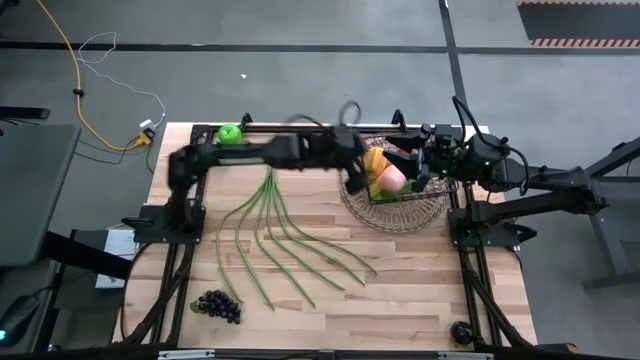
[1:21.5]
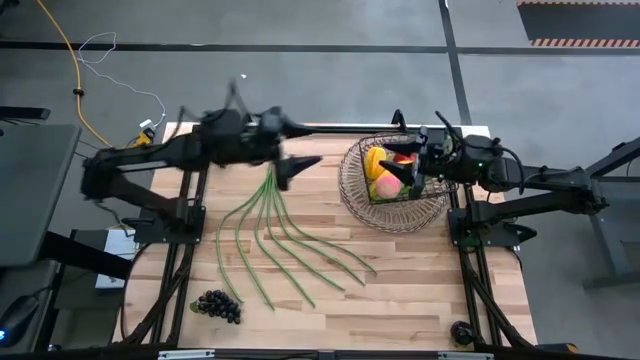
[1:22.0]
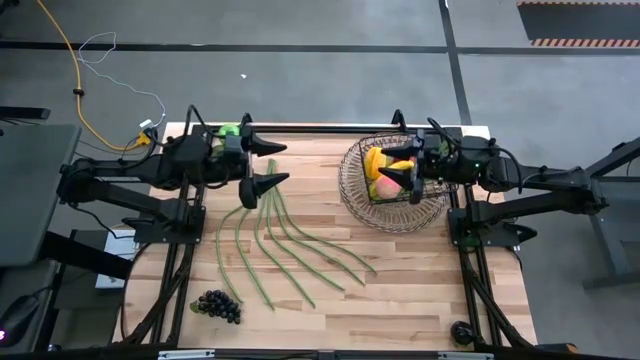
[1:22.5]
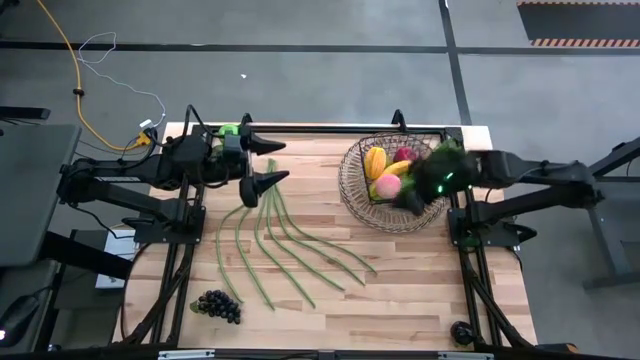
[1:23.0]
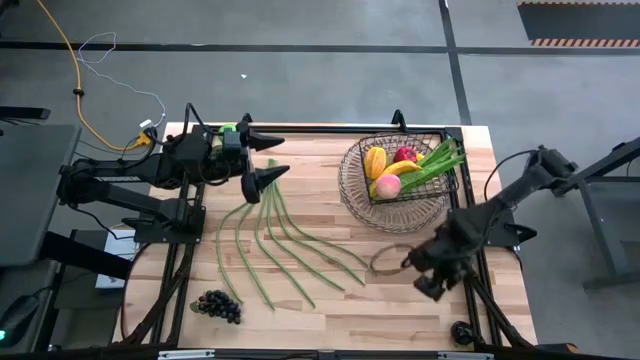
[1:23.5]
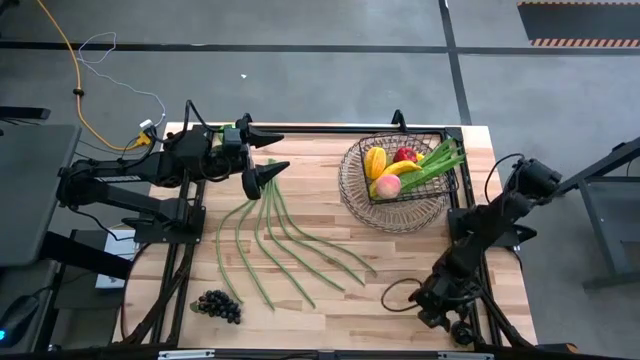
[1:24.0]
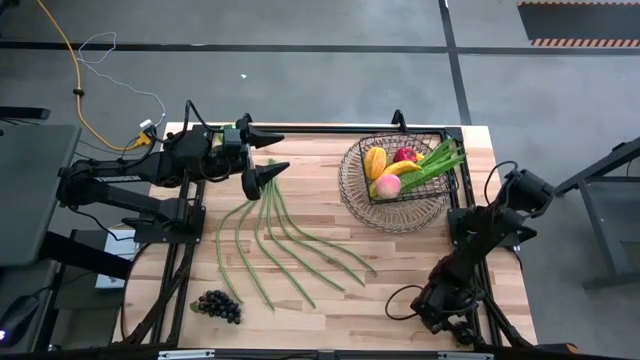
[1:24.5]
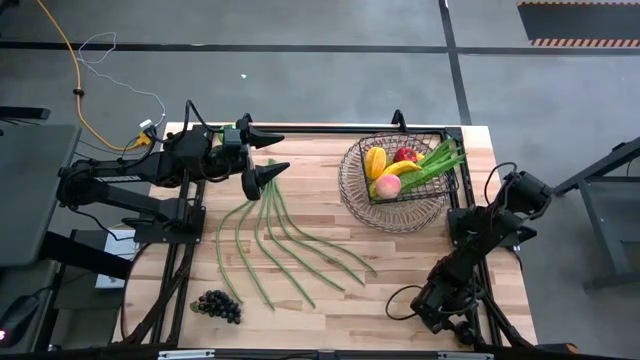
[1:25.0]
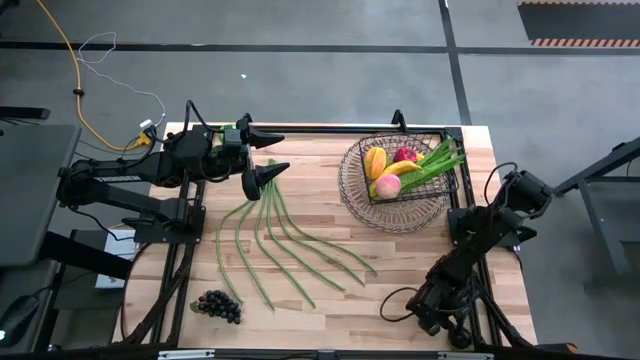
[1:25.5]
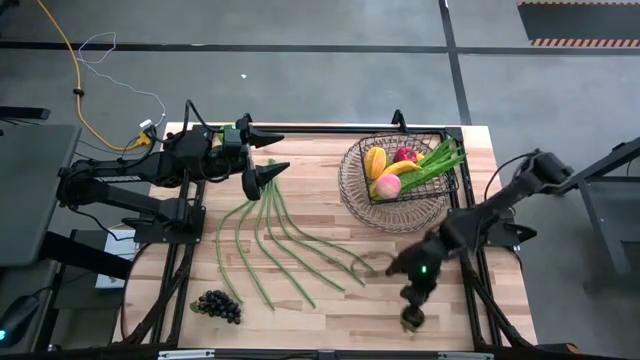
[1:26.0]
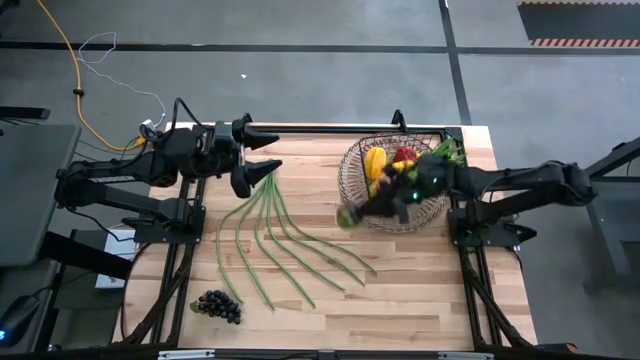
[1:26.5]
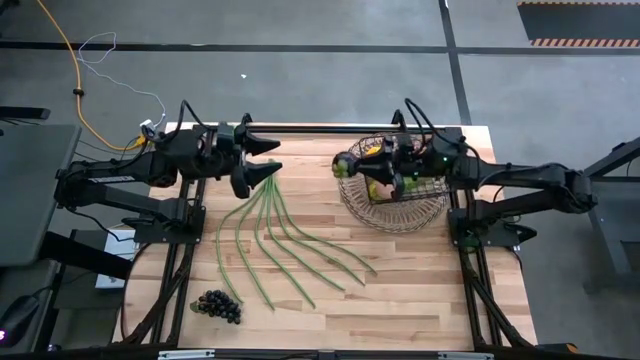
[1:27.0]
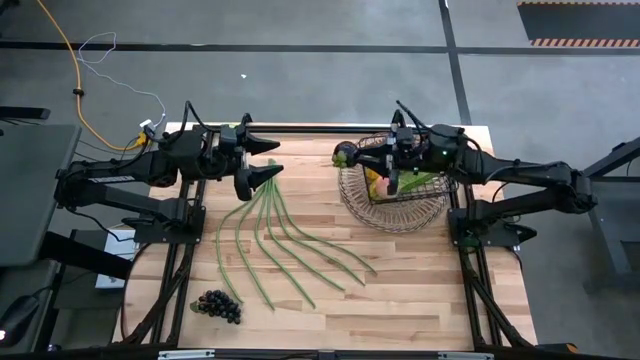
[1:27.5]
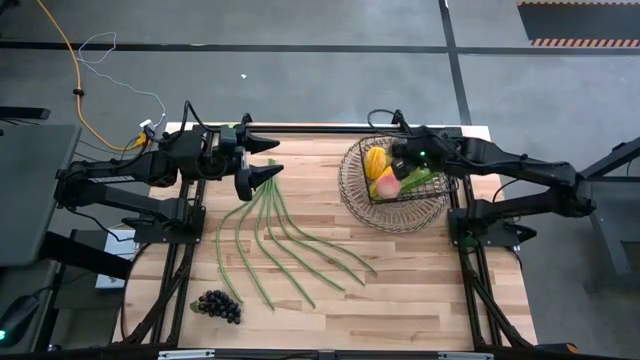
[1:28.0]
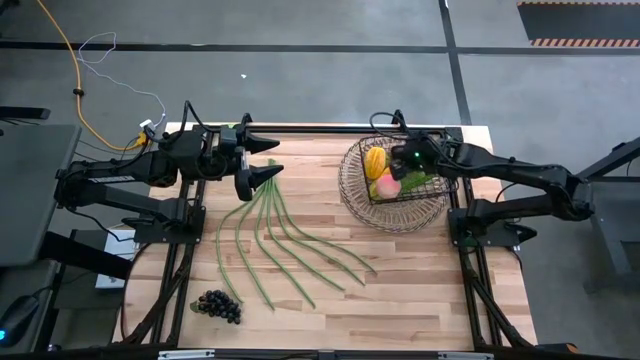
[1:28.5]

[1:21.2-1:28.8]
Task: Build produce basket
Put the dark purple mangosteen into the wire basket

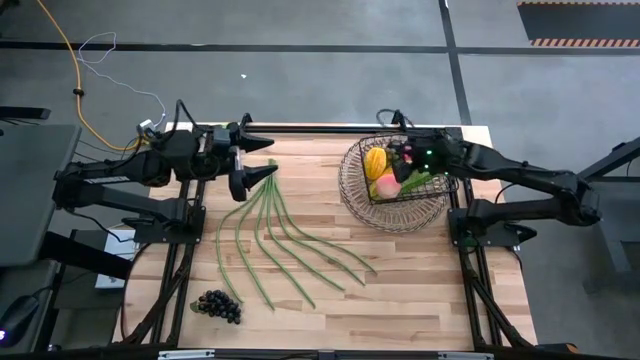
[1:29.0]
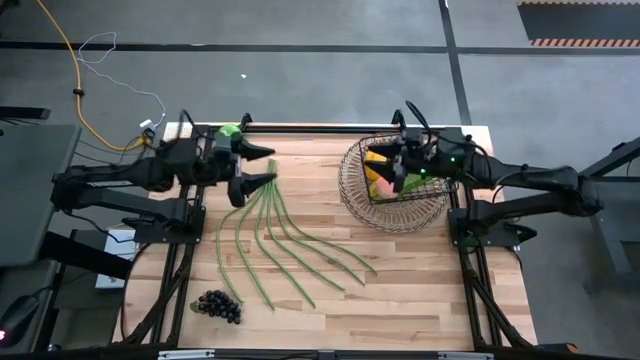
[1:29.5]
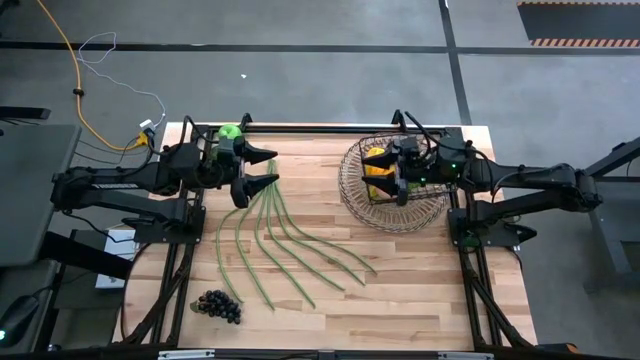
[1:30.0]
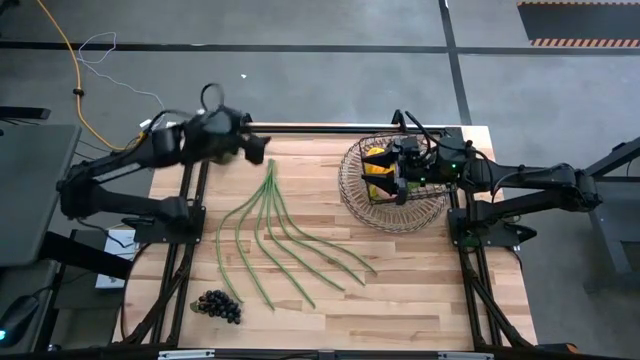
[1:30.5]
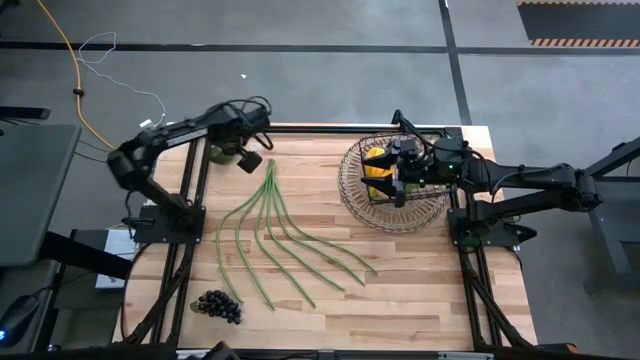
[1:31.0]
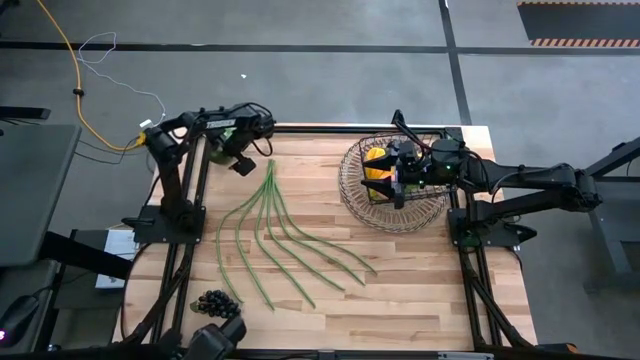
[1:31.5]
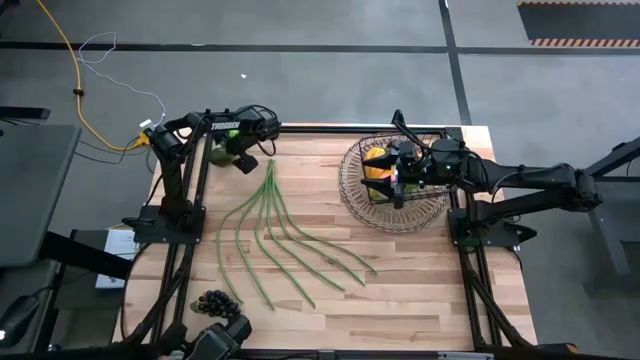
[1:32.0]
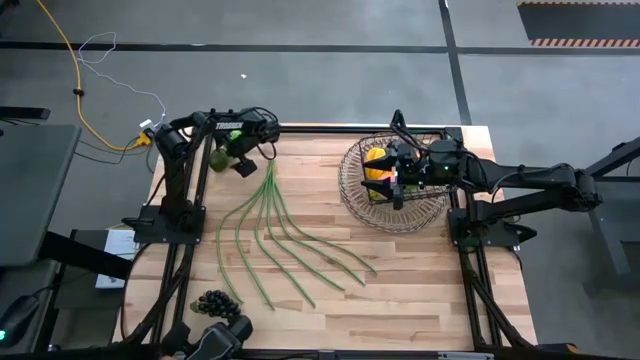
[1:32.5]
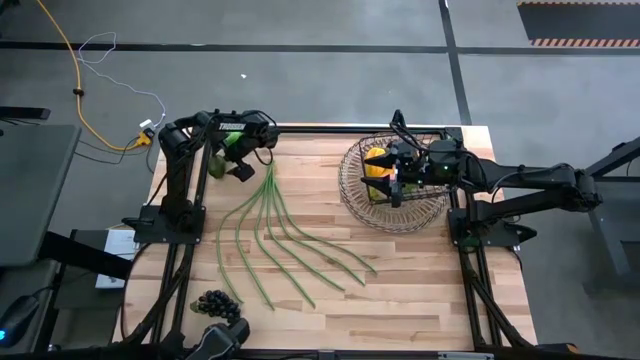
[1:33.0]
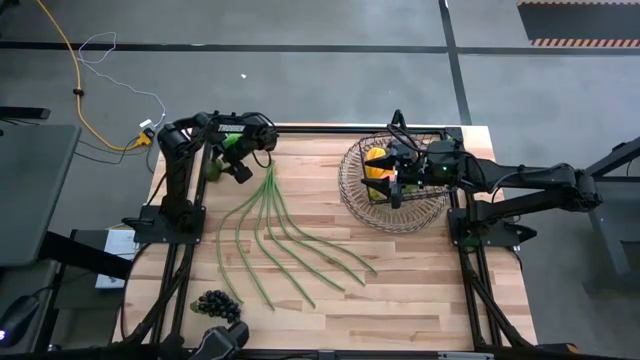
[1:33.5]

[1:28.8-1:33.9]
Put the green lime into the wire basket

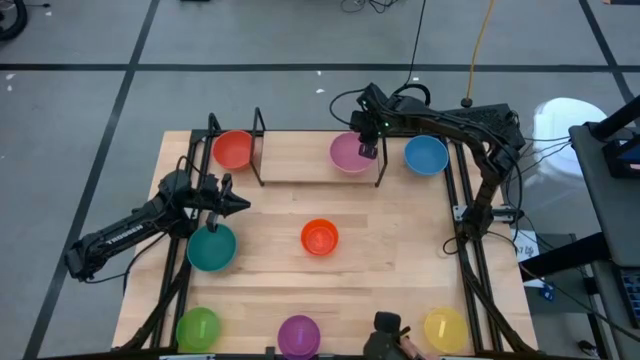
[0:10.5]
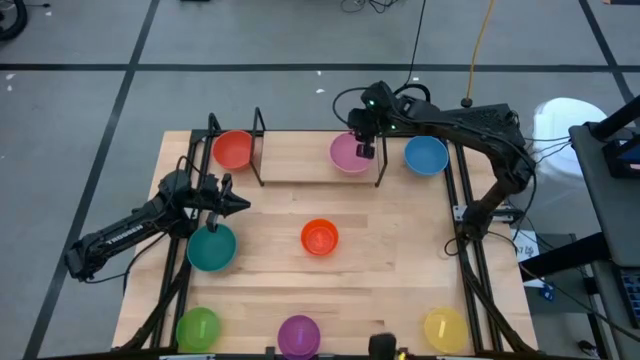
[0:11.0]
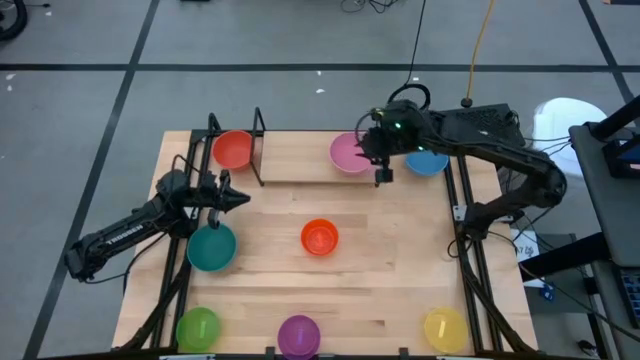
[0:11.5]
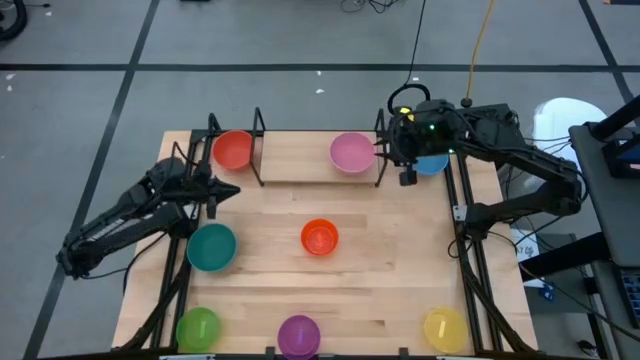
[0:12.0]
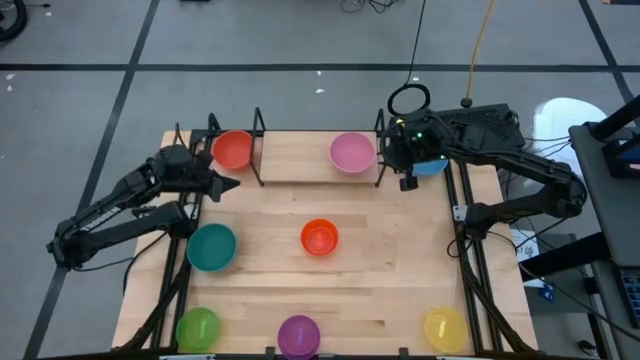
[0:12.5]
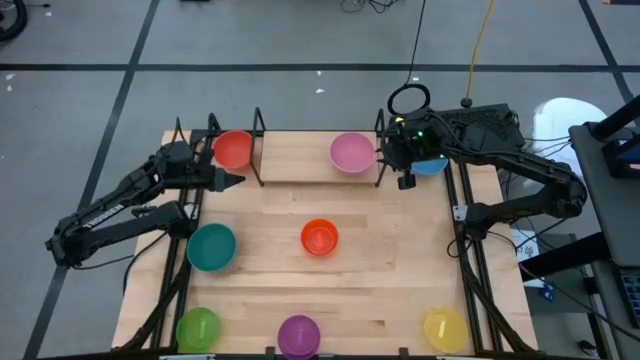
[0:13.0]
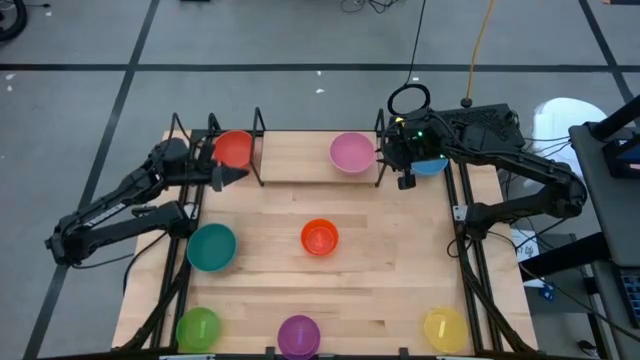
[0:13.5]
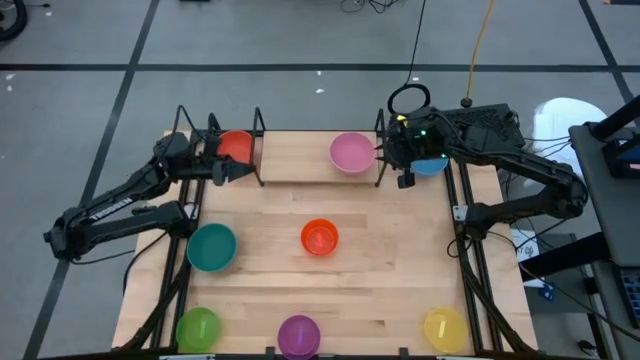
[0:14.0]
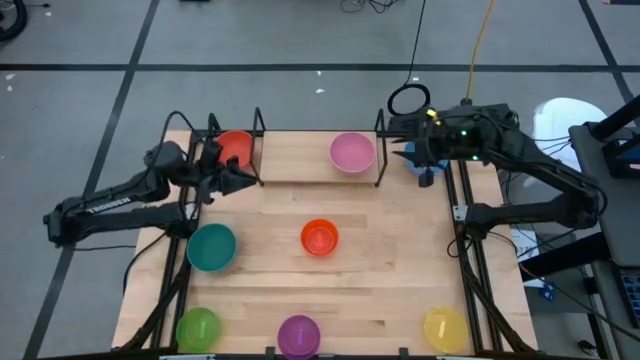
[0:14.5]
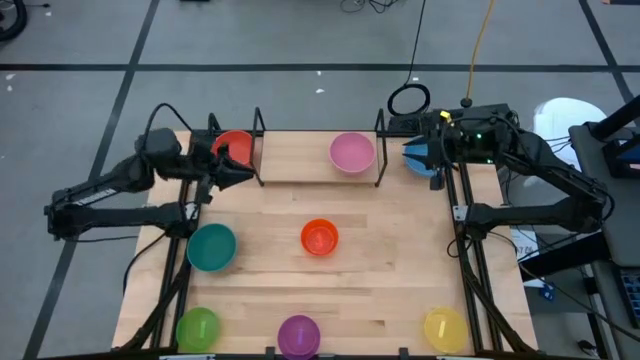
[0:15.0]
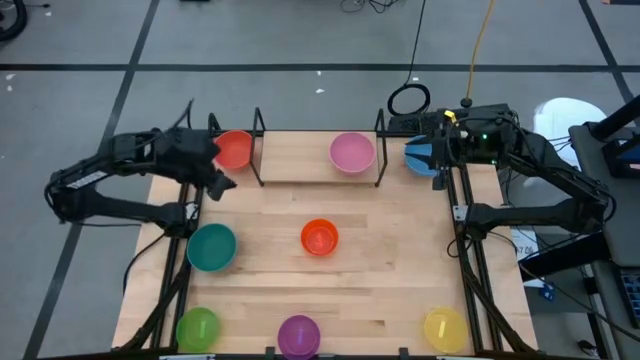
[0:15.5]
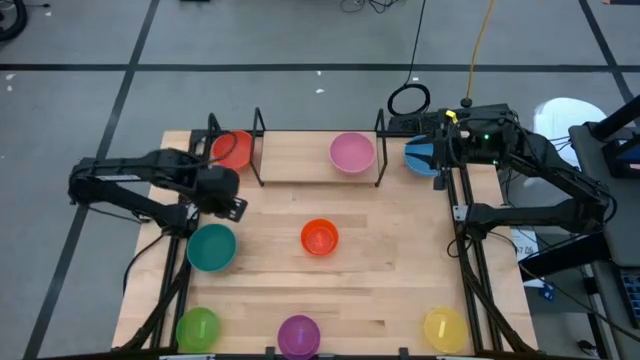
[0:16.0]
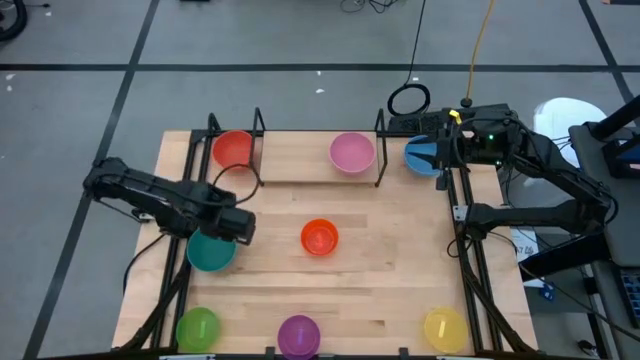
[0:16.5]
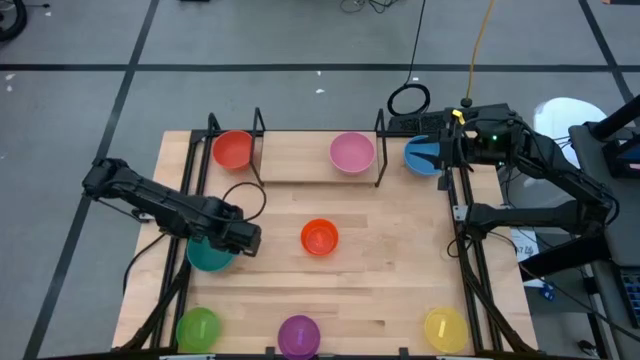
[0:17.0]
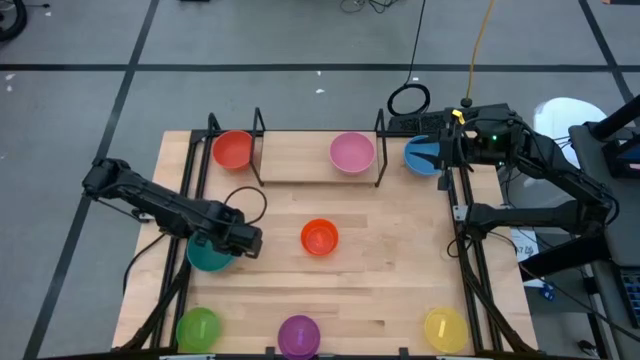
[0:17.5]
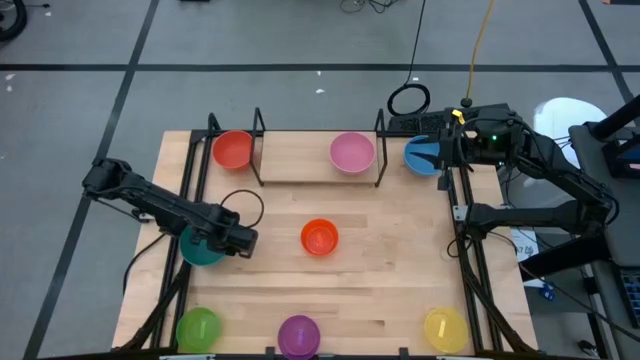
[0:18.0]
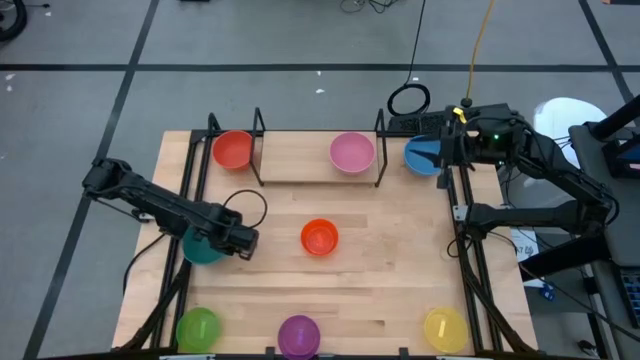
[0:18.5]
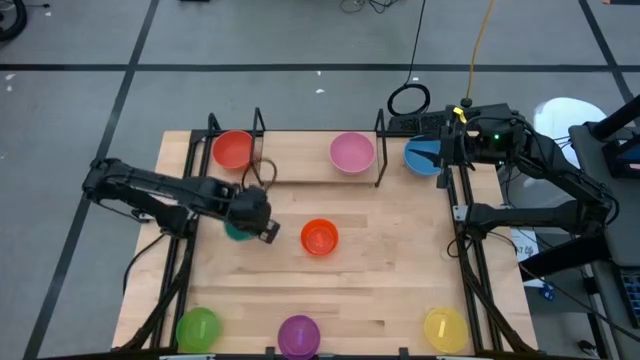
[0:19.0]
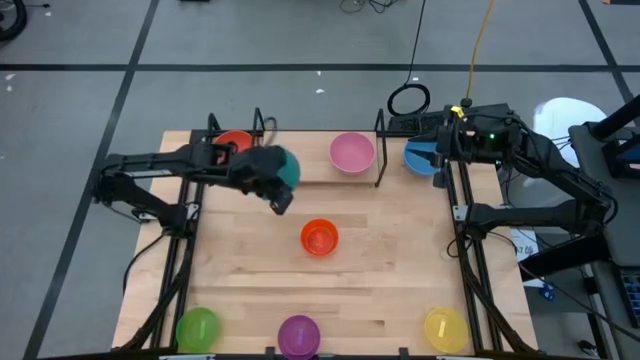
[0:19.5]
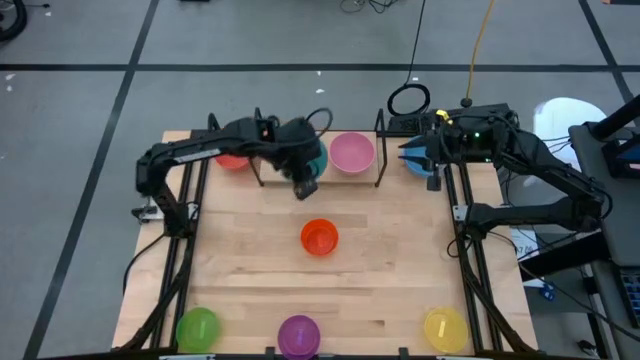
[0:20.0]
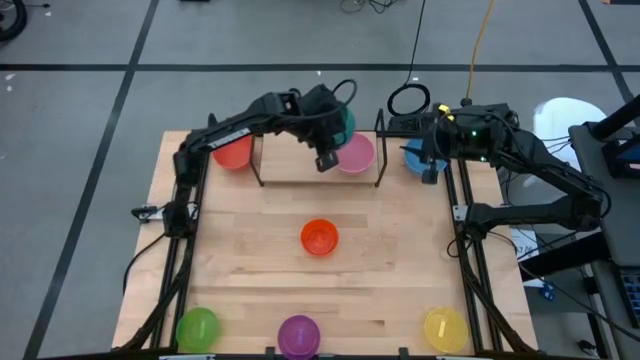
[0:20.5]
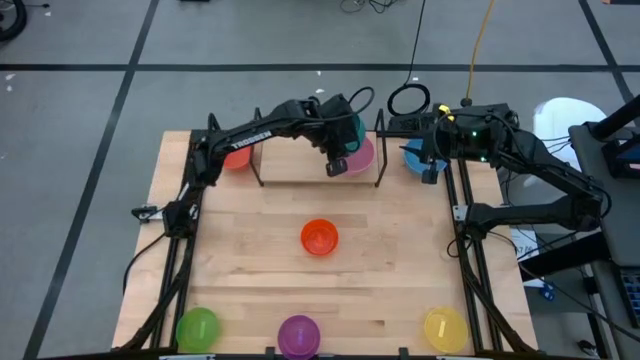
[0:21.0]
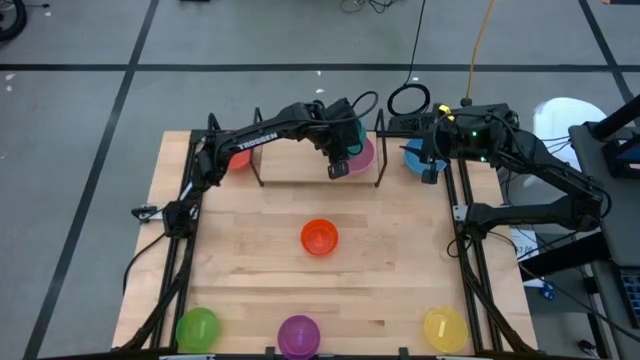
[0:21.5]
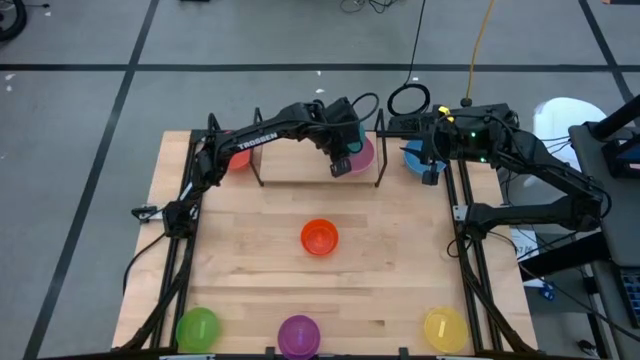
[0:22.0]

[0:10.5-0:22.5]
Task: Place and stack bowls onto a shelf
Stack the dark green bowl on top of the pink bowl on the shelf
